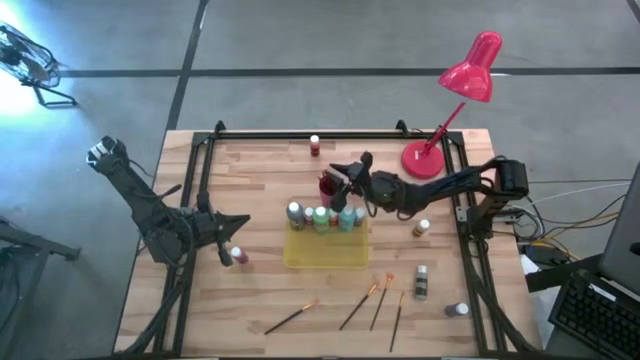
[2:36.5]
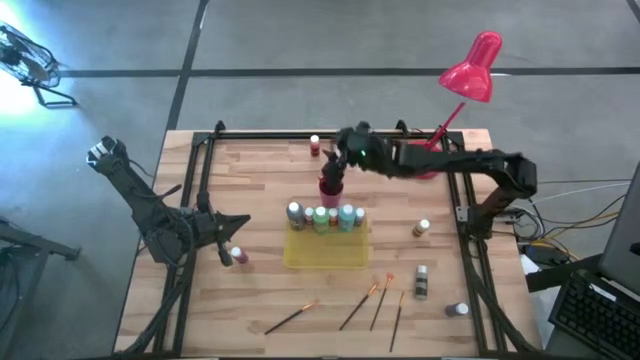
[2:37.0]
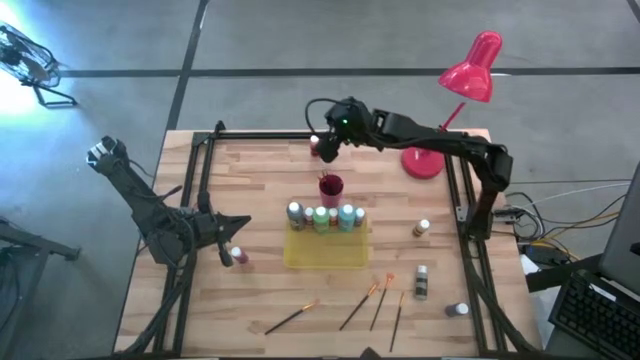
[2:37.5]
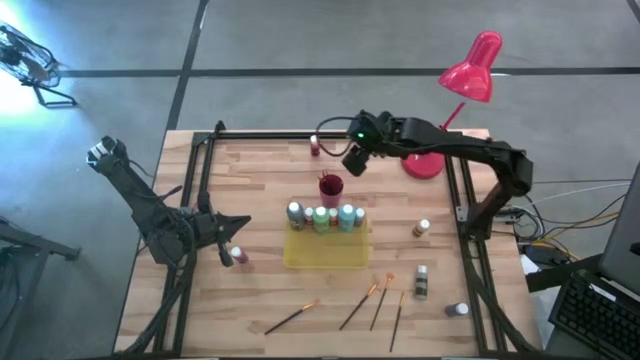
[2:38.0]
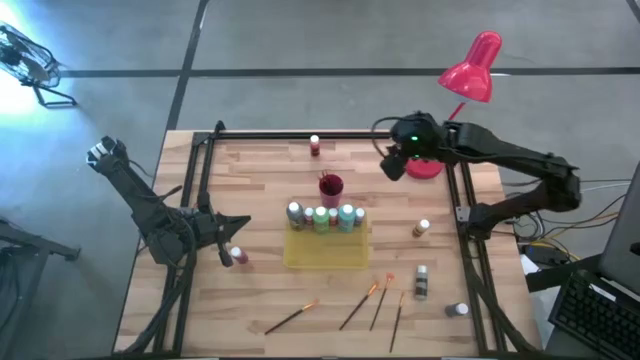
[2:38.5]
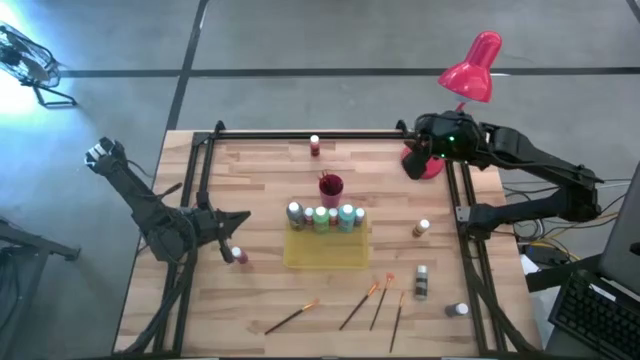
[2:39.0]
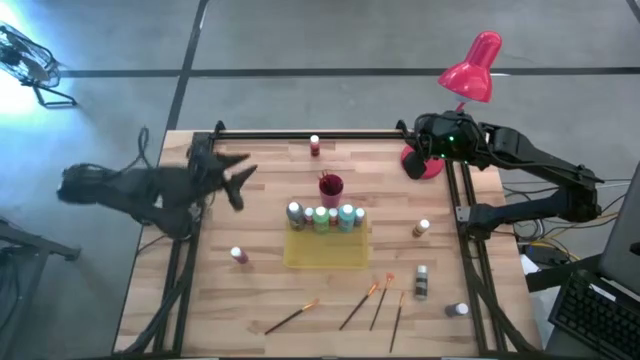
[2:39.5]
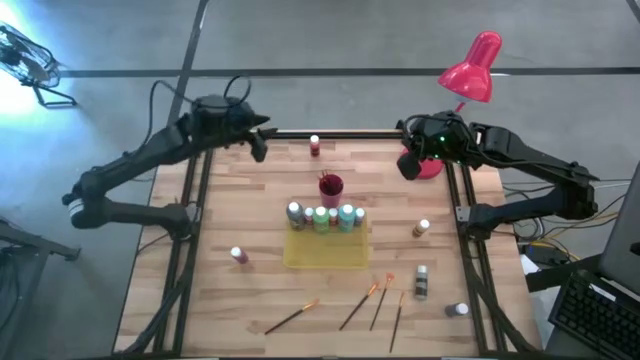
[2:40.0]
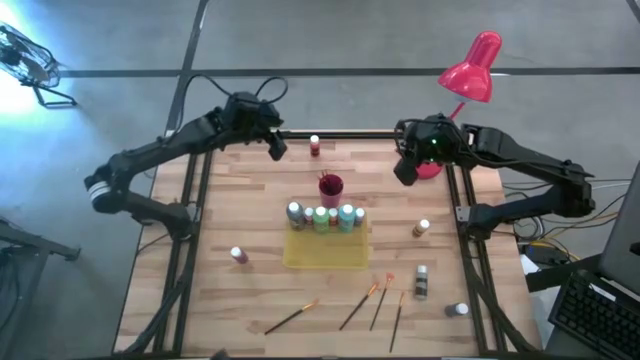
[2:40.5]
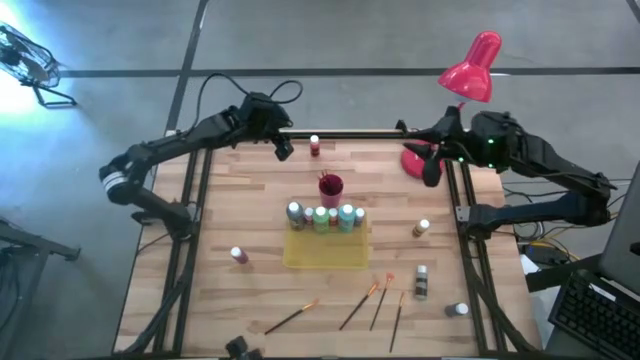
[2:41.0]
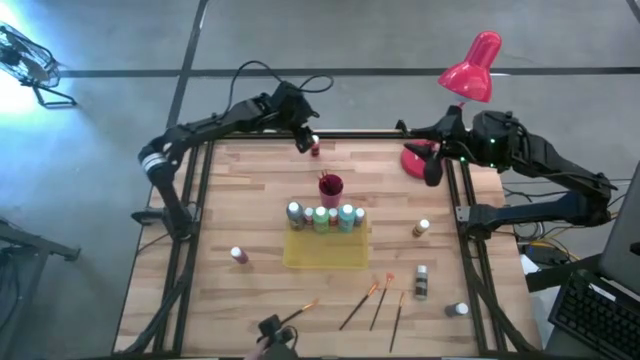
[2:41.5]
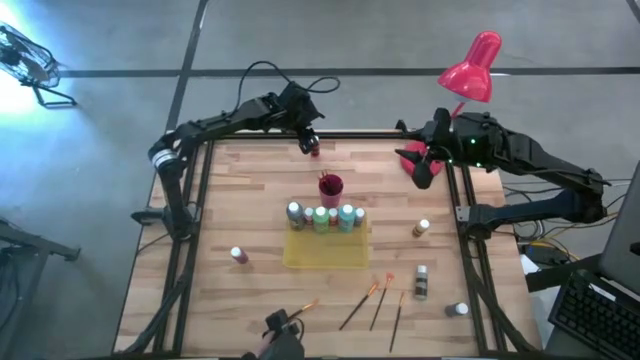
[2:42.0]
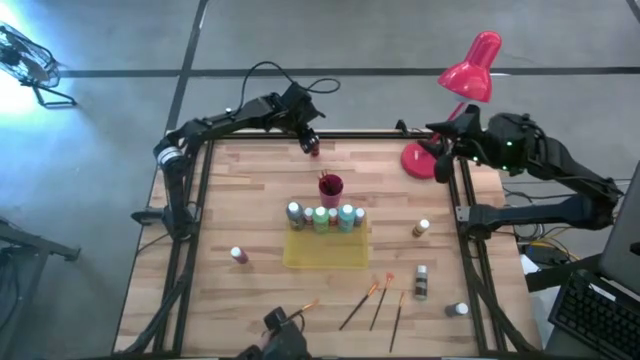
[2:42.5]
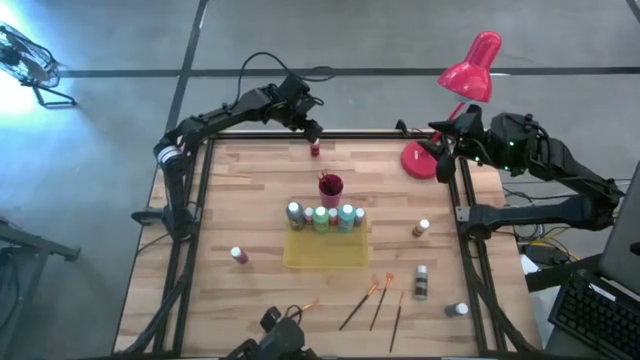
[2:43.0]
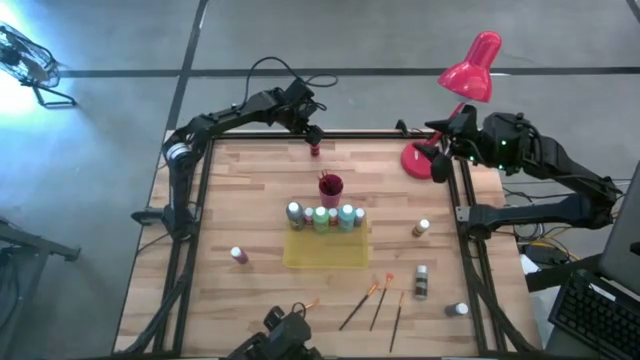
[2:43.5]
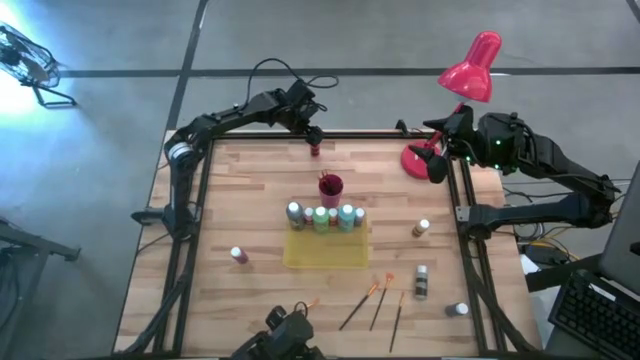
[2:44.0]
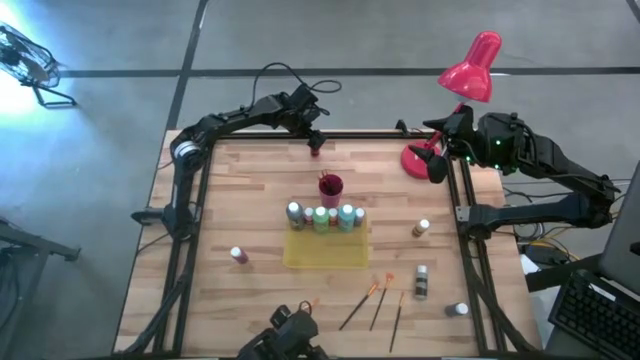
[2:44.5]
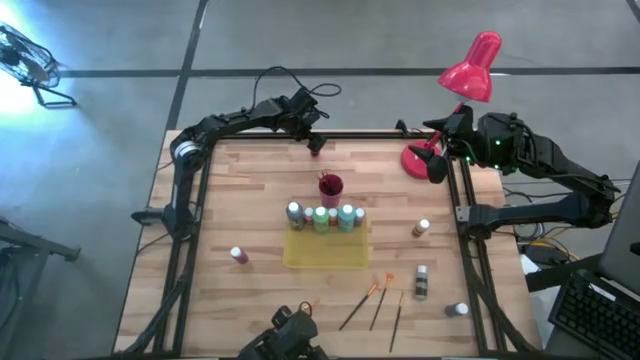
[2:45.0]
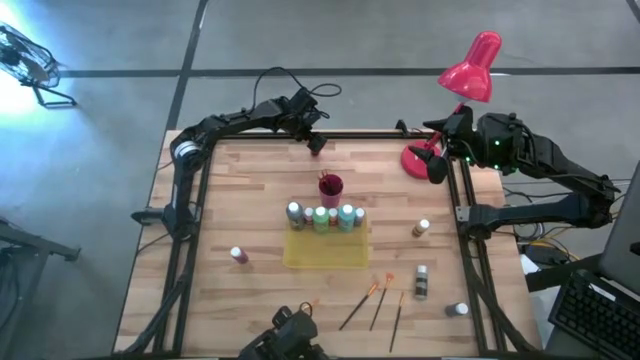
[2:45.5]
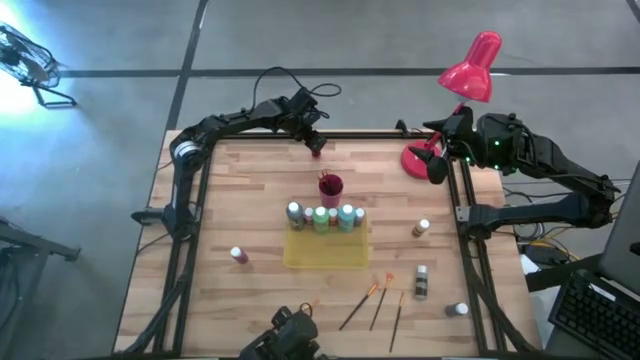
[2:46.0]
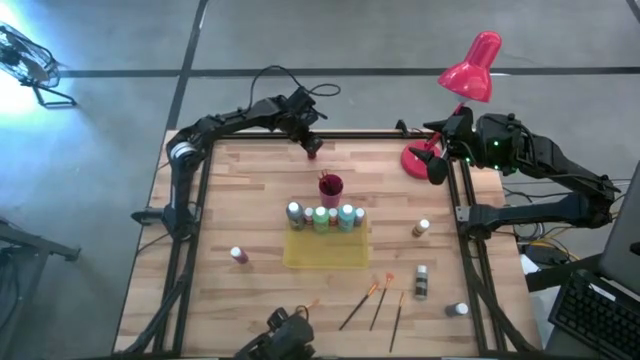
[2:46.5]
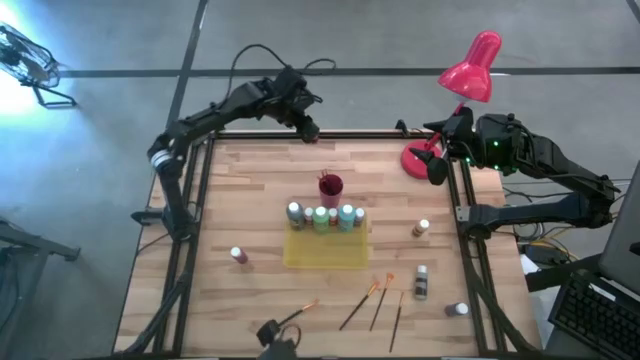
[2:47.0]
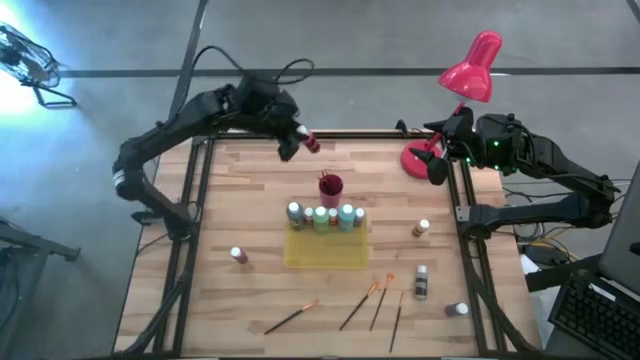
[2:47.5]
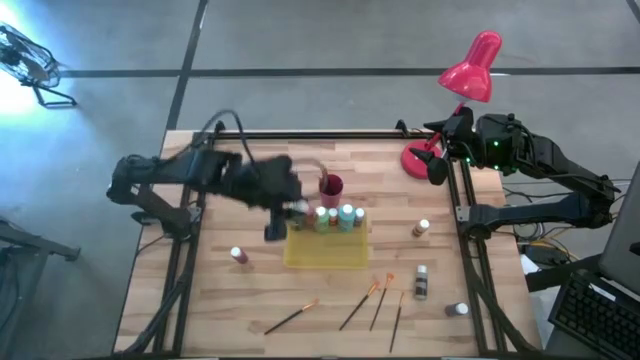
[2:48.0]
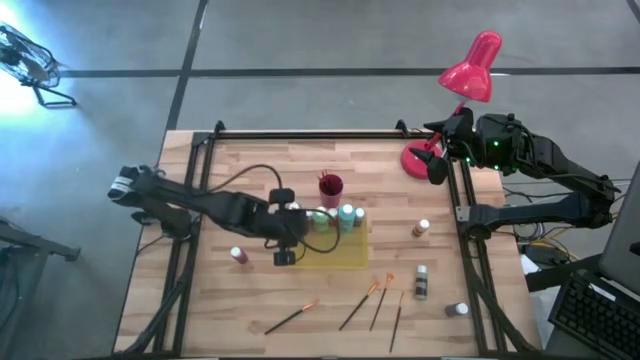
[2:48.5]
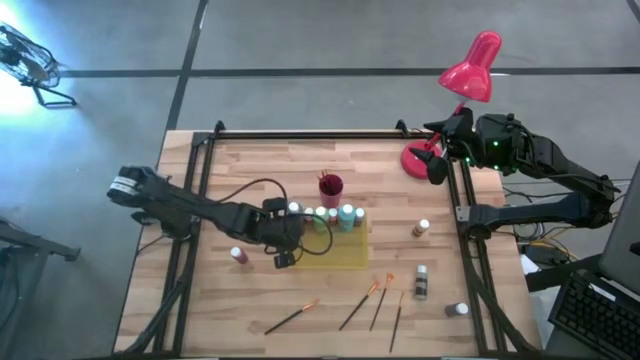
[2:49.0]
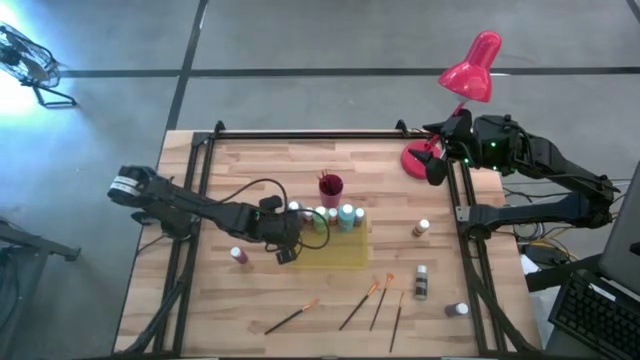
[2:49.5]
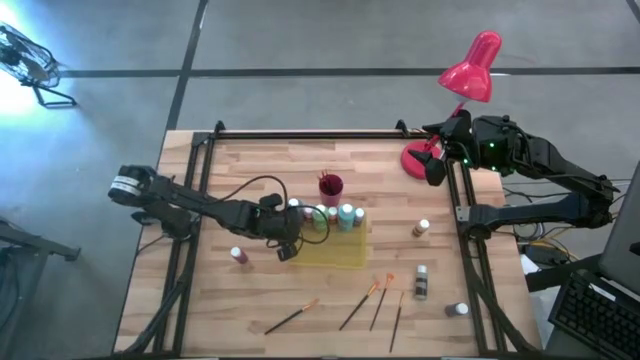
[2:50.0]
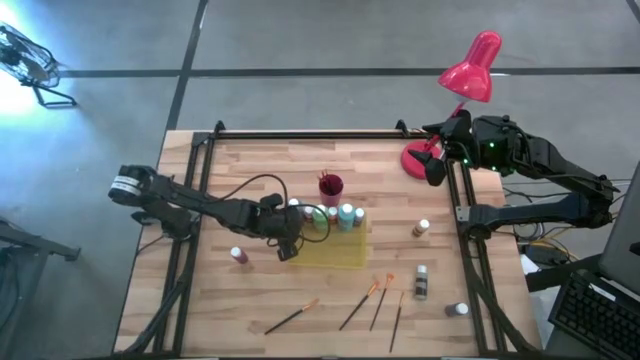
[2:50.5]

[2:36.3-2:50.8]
Task: Pick & Place Paint Supplies
Put the small orange paint bottle into the yellow bin

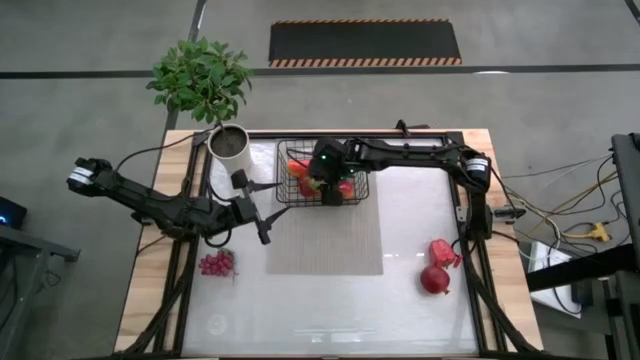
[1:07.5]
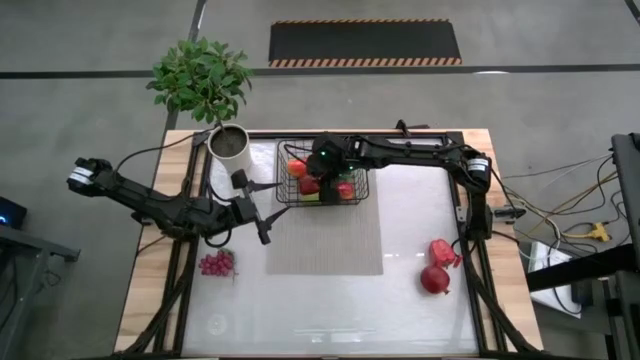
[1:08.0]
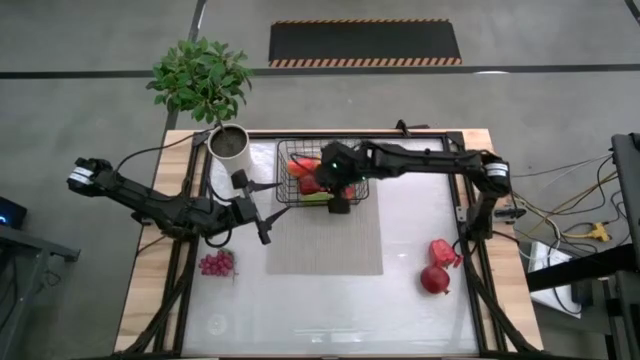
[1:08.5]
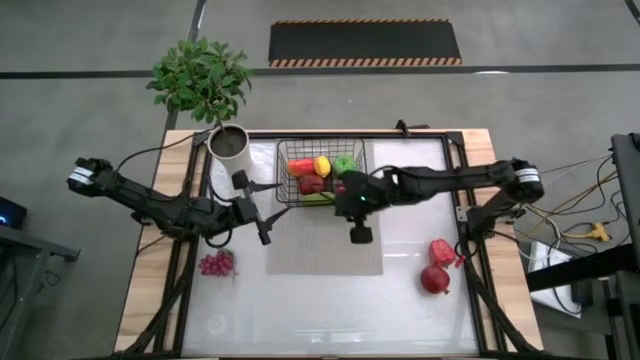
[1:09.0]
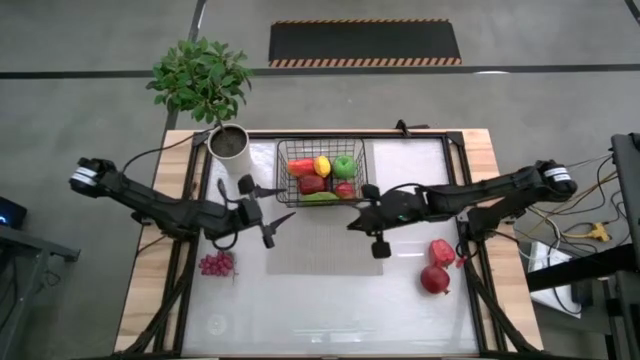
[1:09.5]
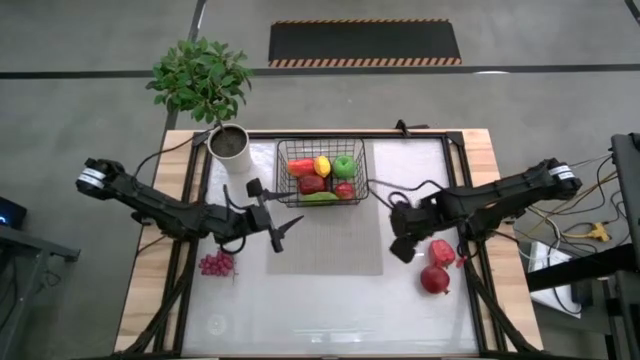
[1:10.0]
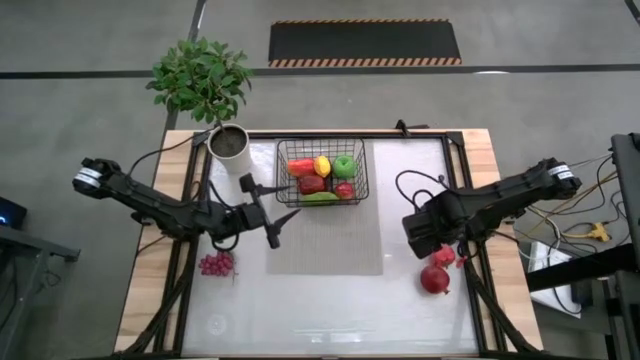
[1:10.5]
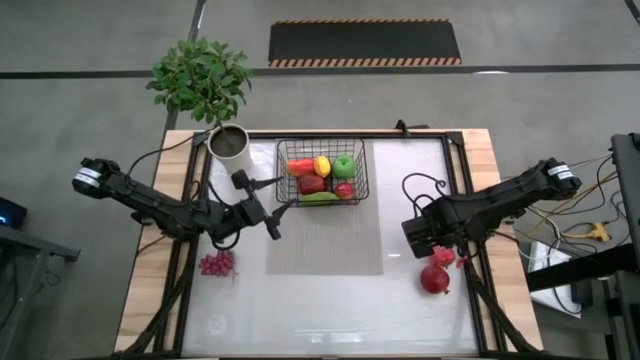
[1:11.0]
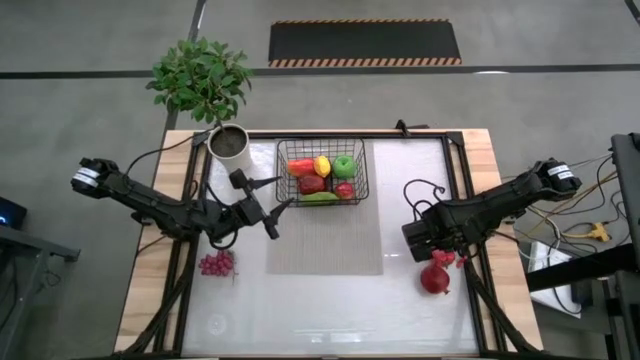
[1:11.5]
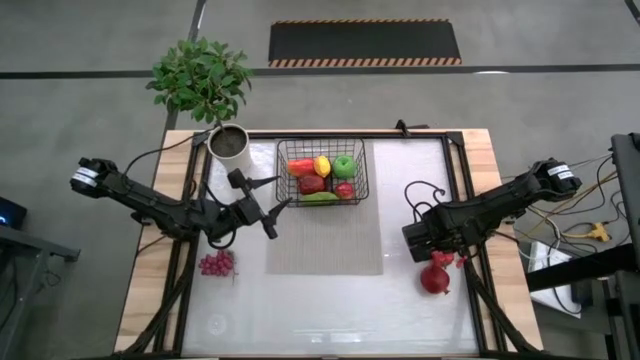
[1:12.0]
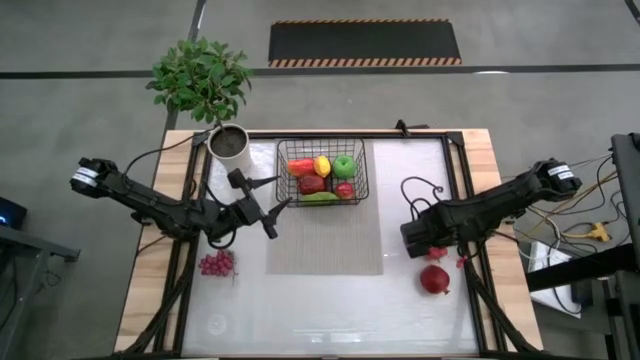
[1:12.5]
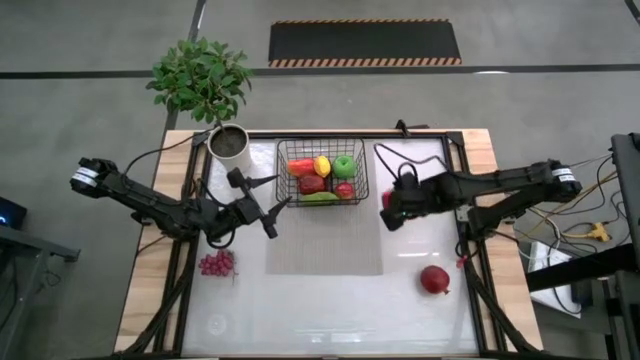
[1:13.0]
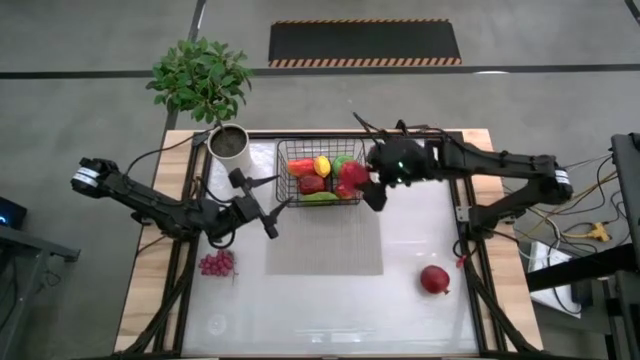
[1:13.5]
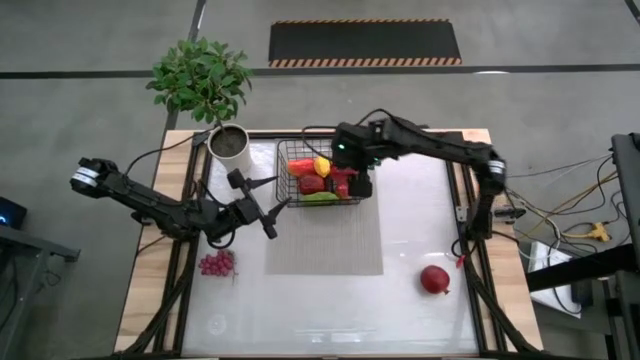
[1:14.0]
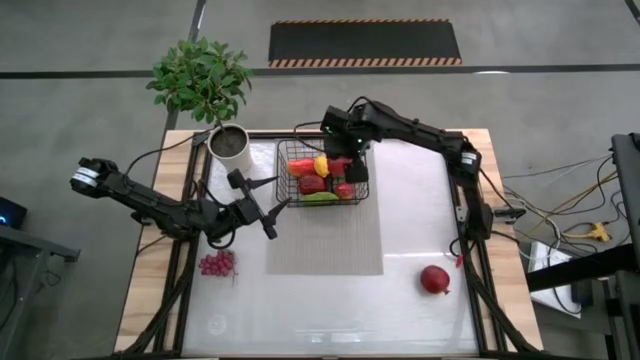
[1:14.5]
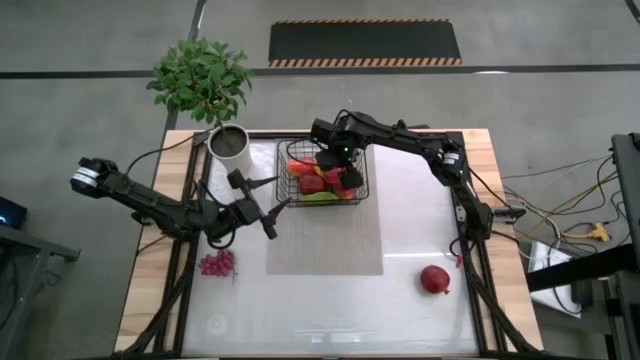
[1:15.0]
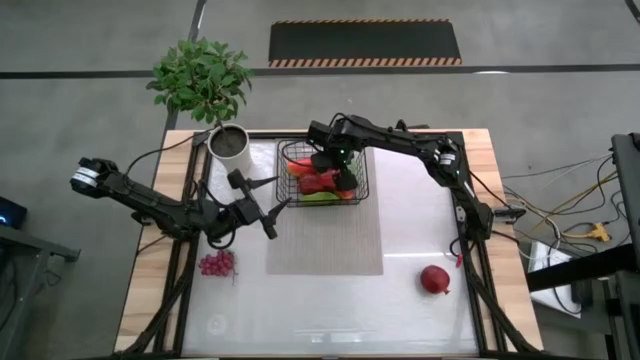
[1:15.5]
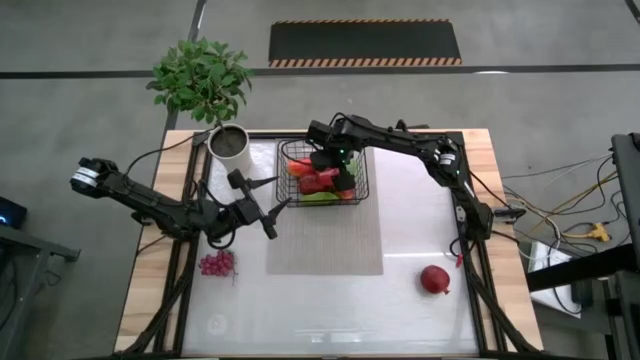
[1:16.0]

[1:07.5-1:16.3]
Task: Build produce basket
Put the bell pepper into the wire basket
